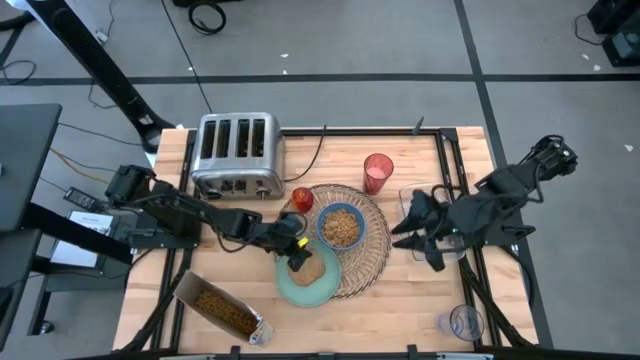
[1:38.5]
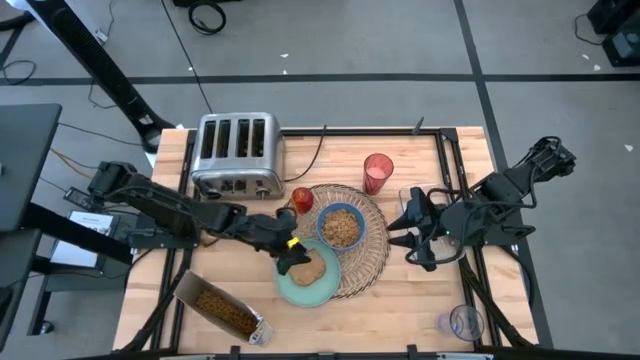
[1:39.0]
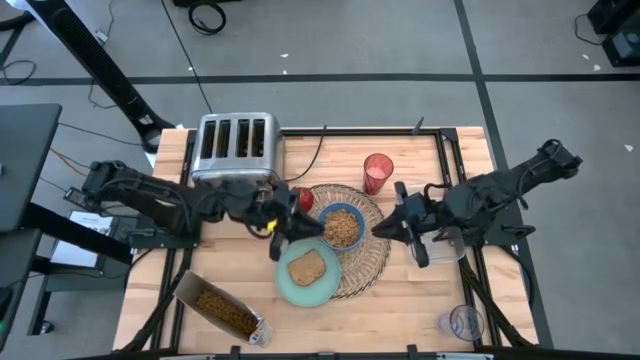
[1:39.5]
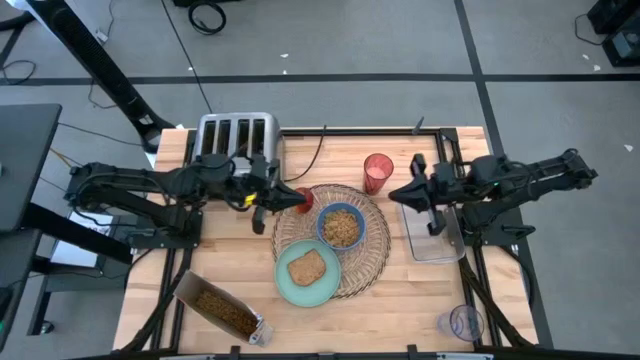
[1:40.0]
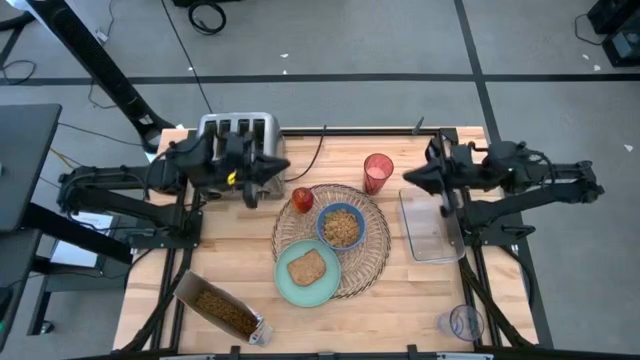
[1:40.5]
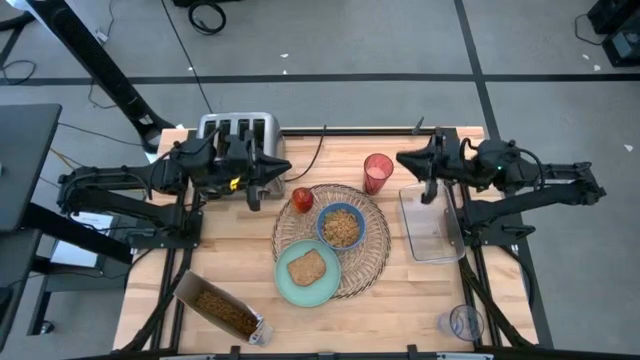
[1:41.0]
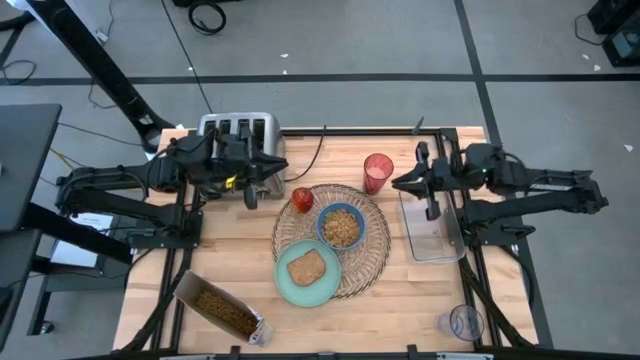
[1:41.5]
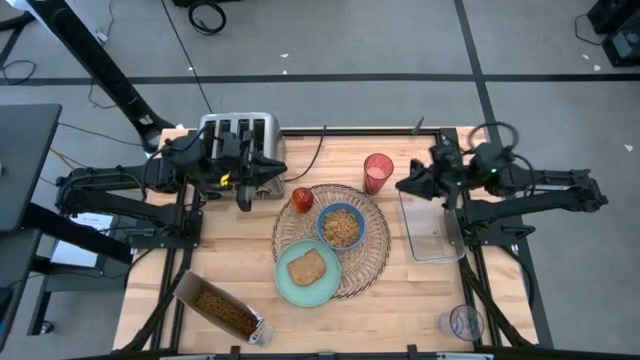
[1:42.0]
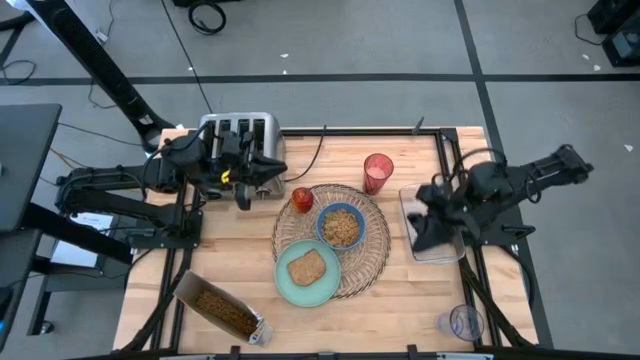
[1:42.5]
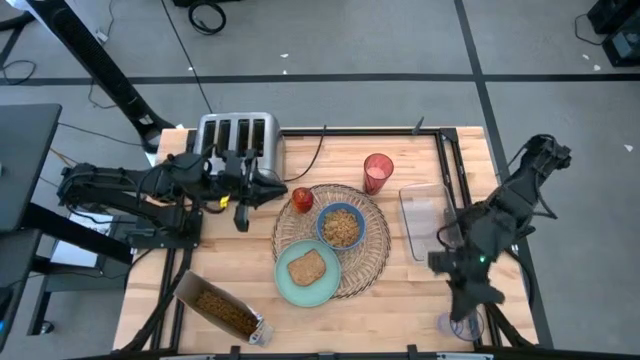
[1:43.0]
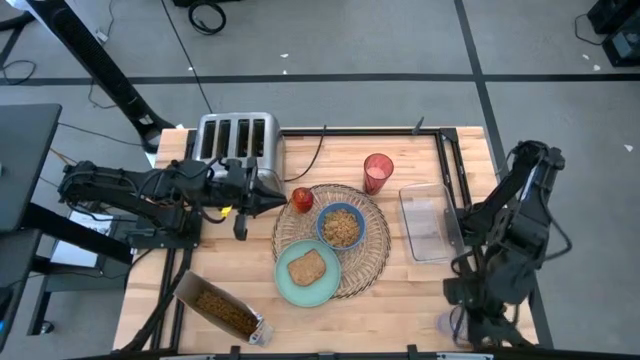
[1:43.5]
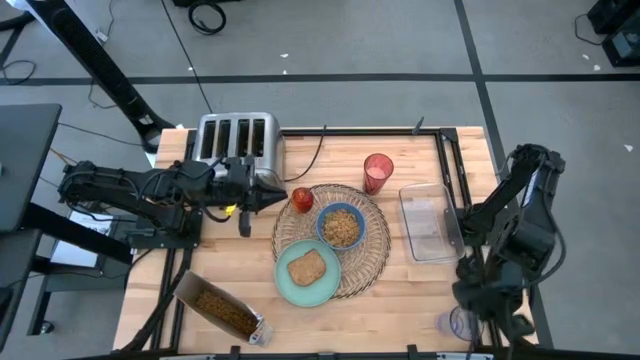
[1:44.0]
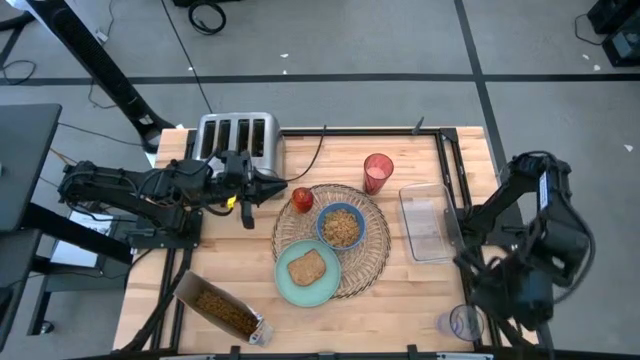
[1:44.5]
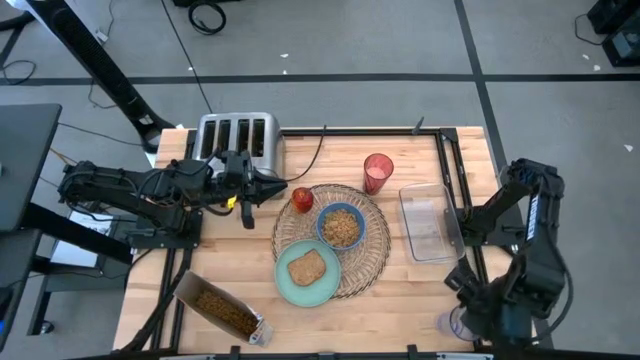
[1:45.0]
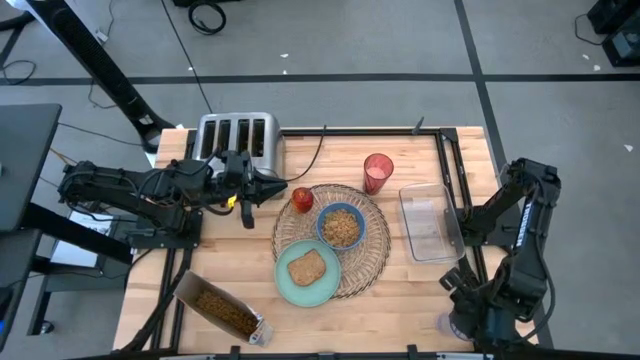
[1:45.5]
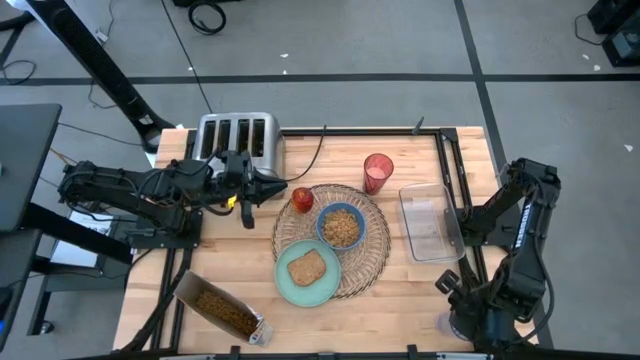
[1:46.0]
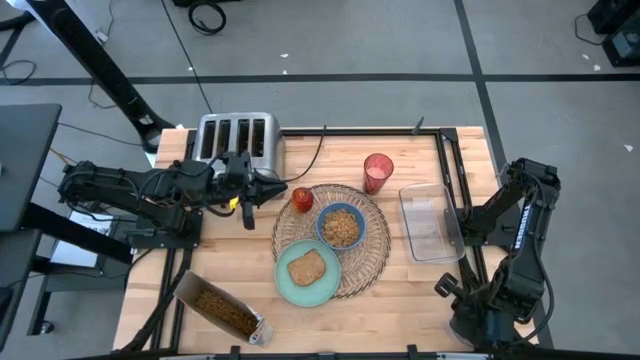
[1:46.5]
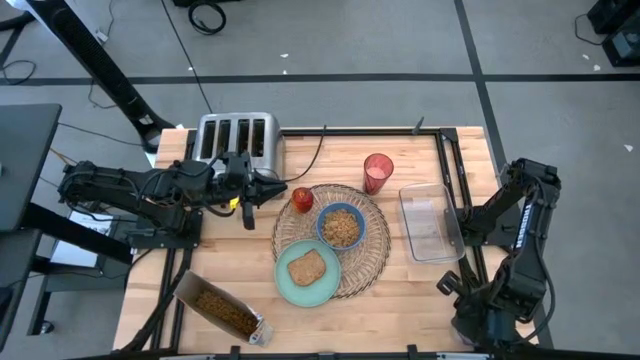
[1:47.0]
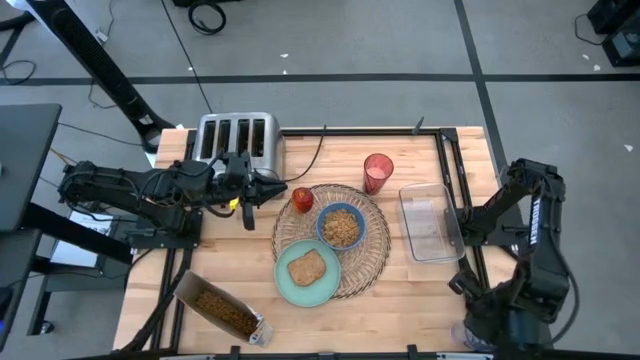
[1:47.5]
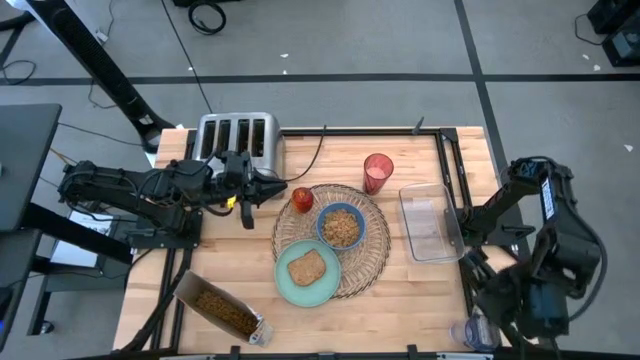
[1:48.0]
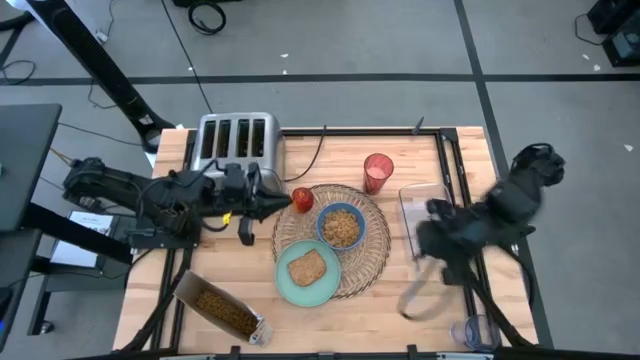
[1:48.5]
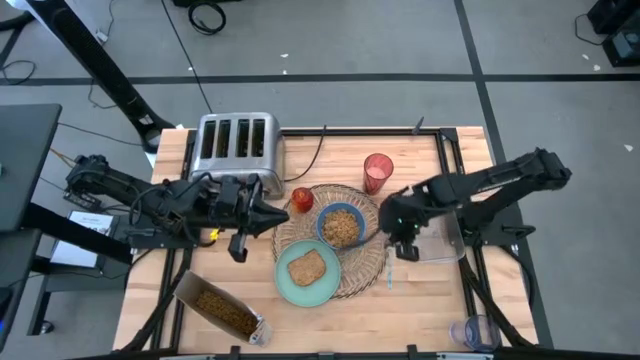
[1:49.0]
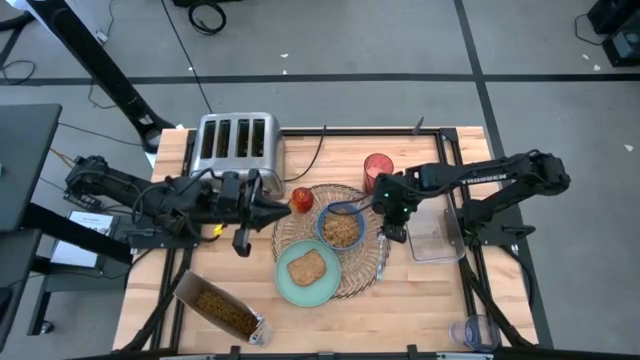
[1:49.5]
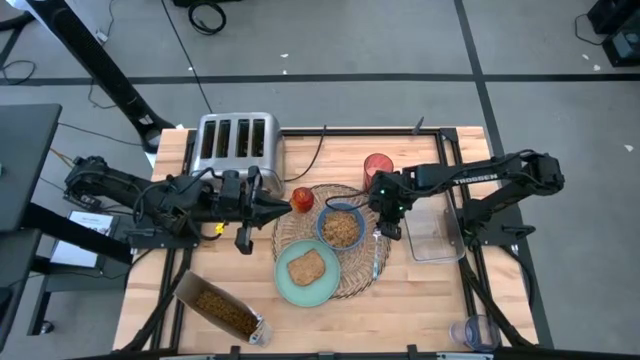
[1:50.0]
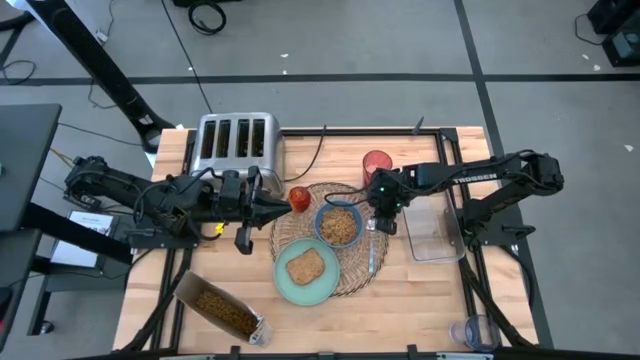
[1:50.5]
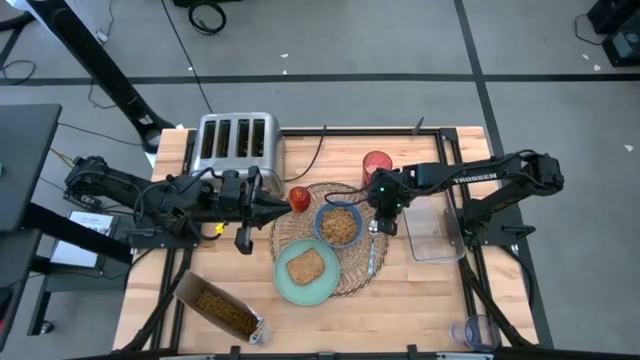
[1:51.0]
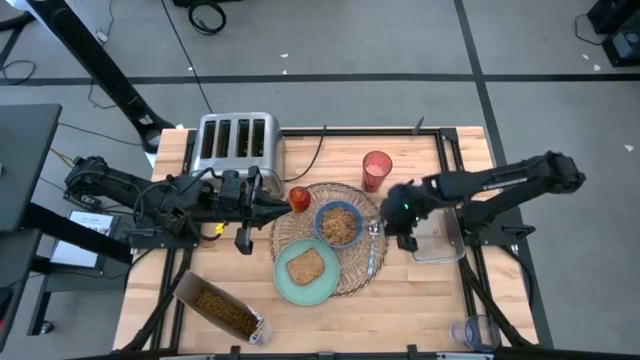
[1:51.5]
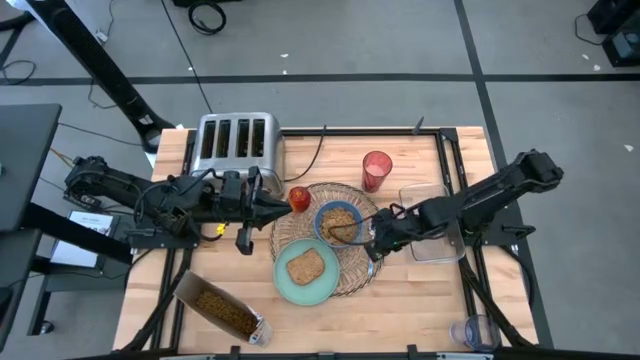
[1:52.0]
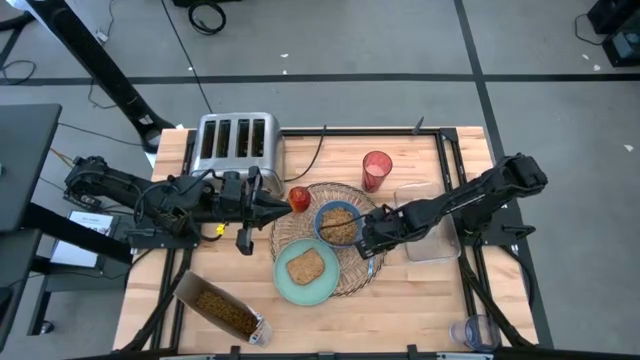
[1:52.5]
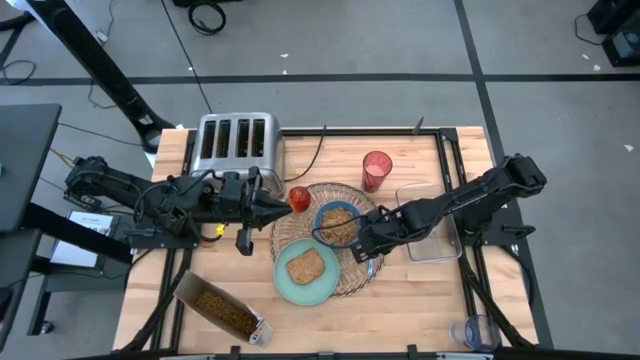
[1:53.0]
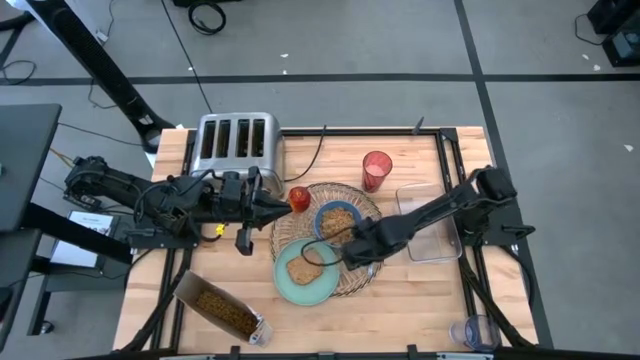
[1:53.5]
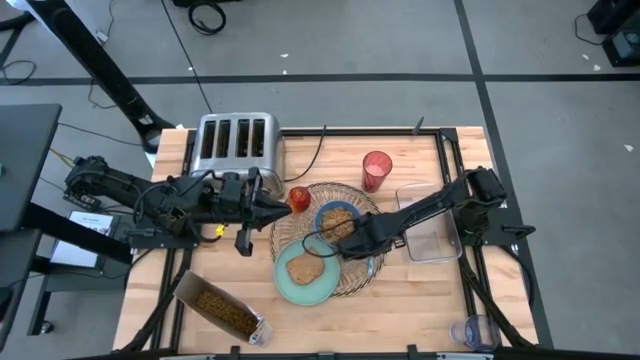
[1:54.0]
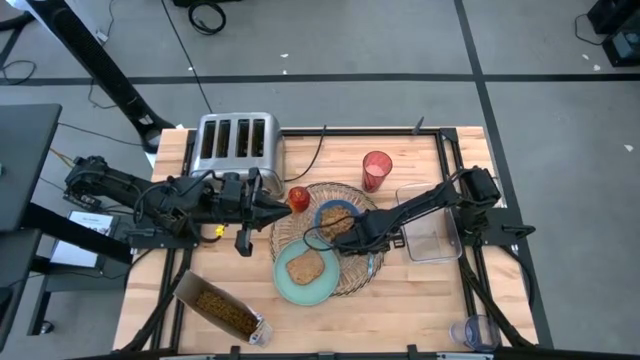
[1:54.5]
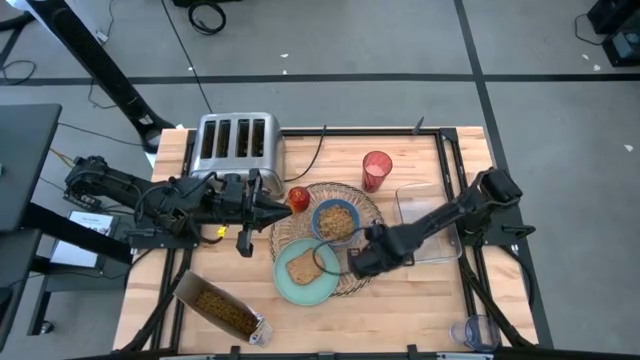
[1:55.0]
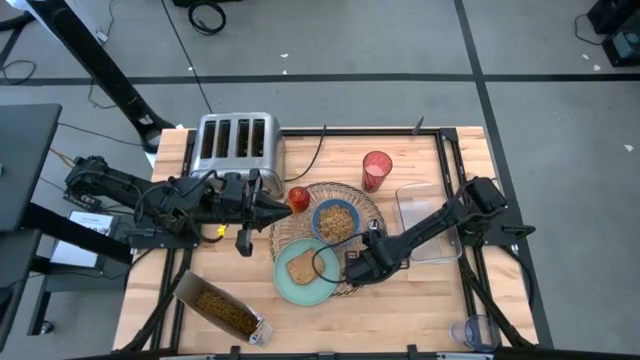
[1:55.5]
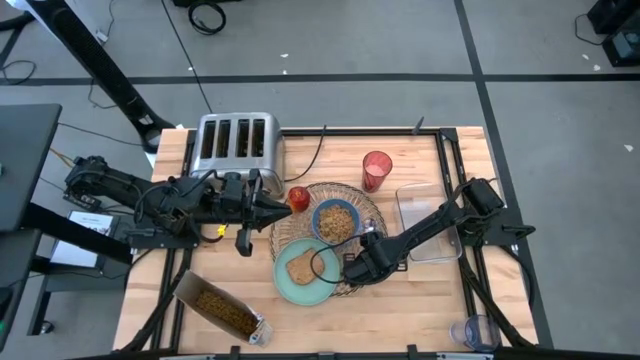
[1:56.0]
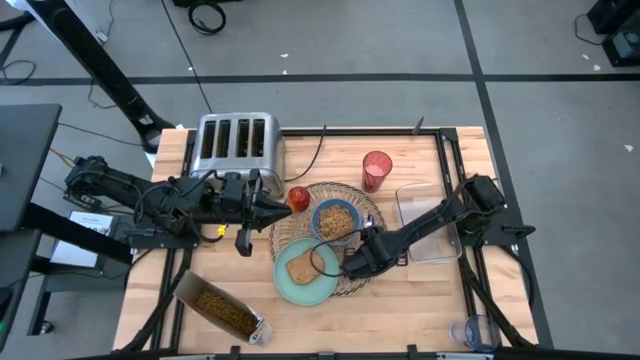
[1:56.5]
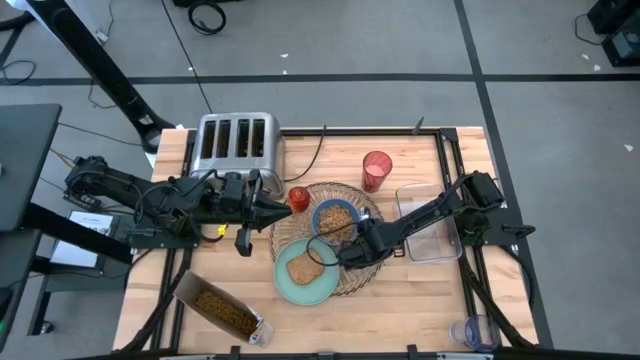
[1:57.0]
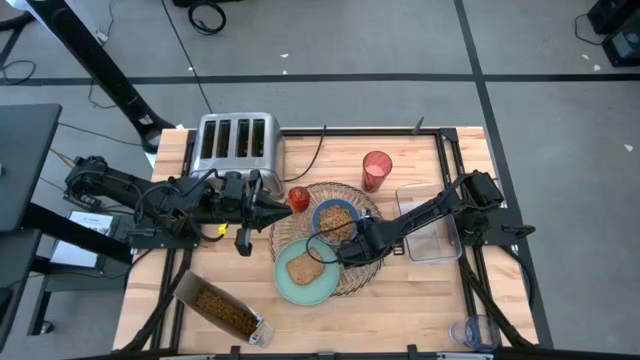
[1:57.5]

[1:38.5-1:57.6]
Task: Arrange a breakfast setting
Put the blue spoon on the brown mat to the right of the blue bowl

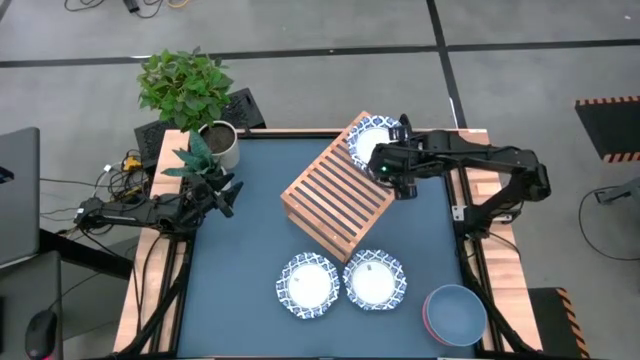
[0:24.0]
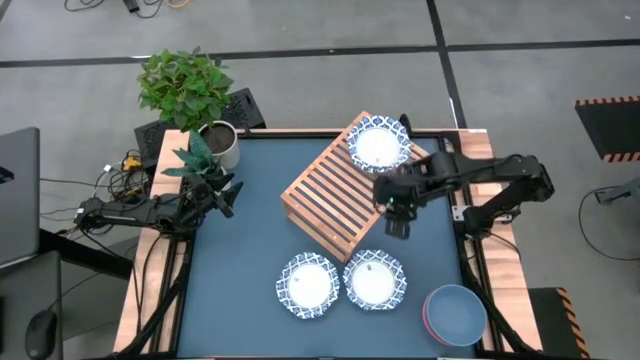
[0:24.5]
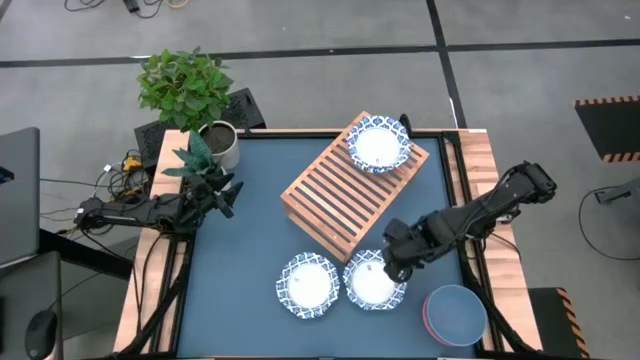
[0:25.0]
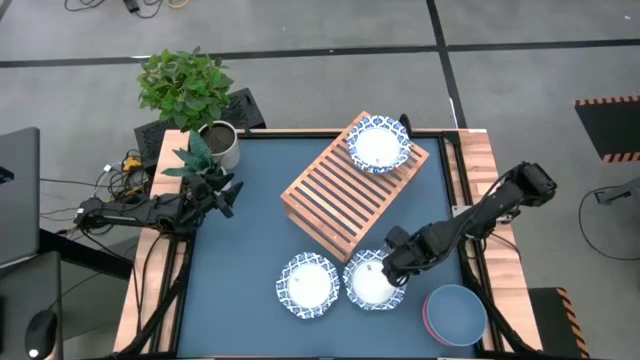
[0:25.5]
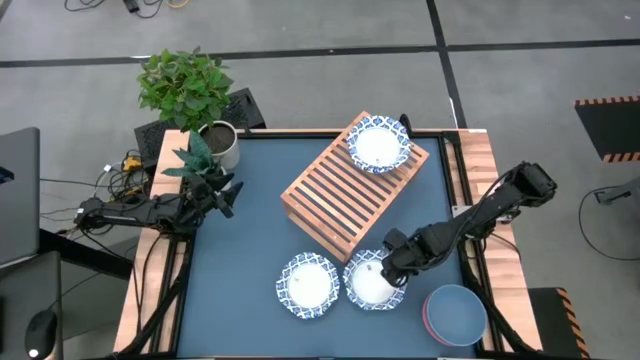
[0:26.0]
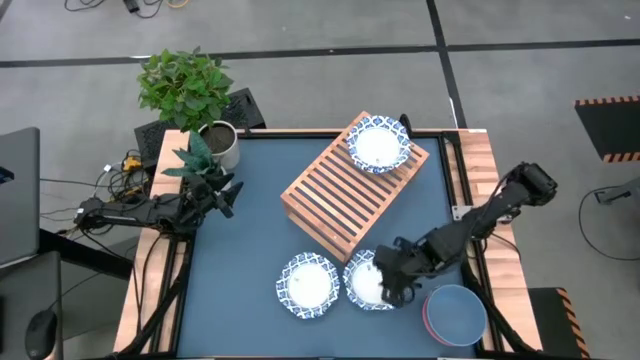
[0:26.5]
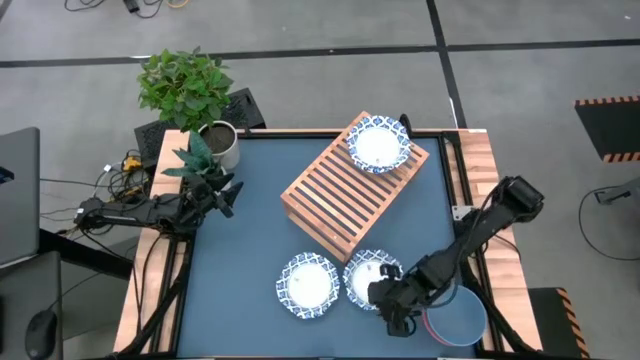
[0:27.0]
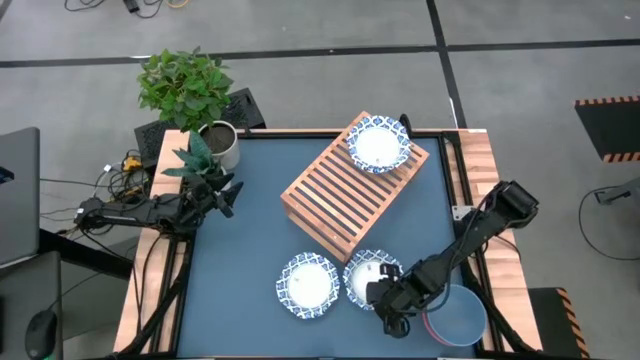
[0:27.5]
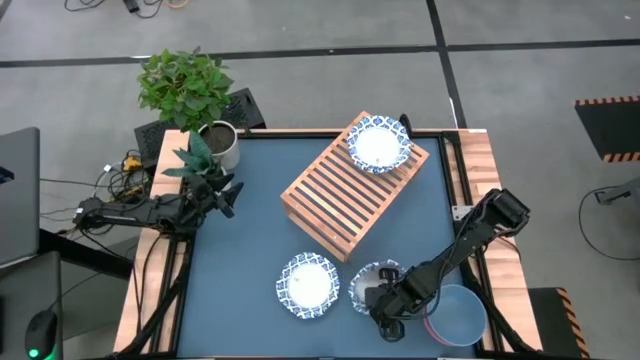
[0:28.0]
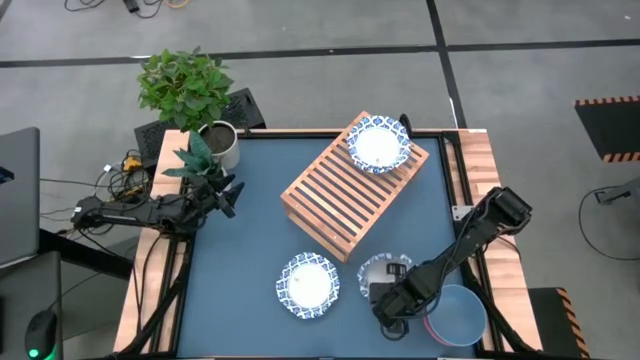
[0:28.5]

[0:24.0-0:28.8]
Task: Place and stack bowls onto a shelf
Stack the right white and blue patterned bowl on top of the other white and blue patterned bowl on the shelf
